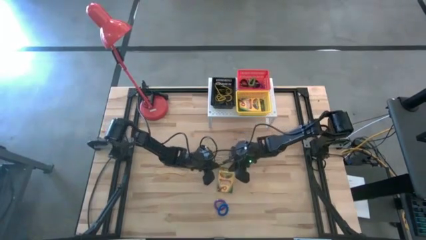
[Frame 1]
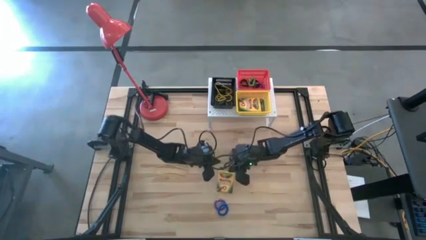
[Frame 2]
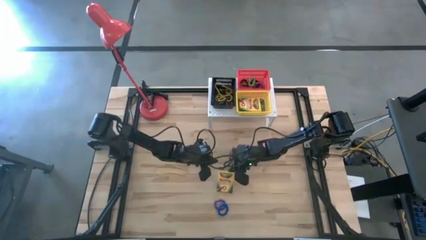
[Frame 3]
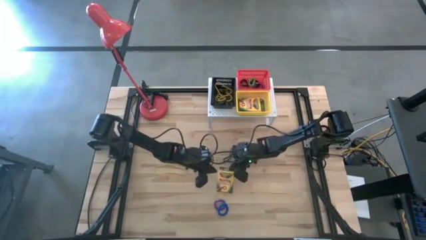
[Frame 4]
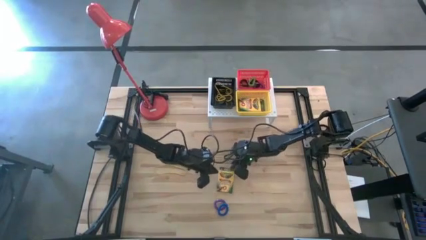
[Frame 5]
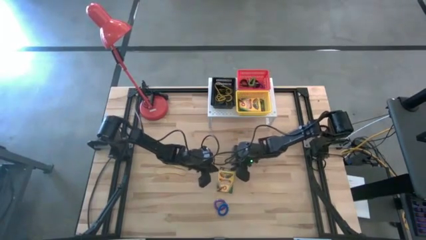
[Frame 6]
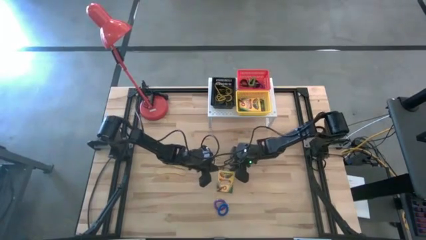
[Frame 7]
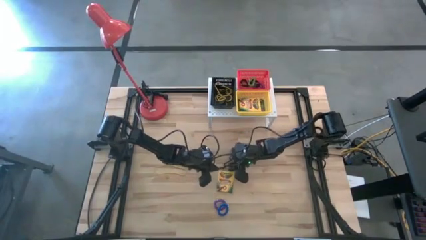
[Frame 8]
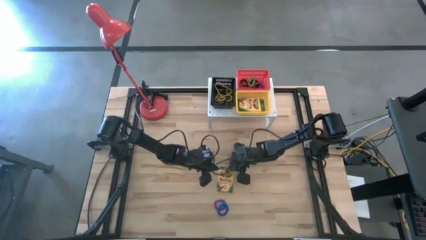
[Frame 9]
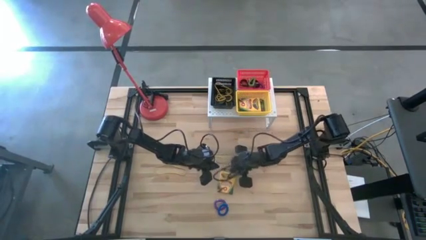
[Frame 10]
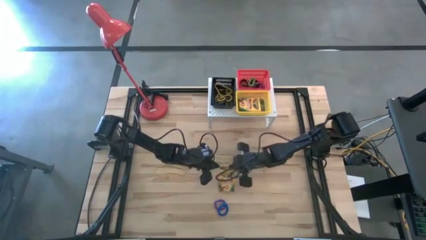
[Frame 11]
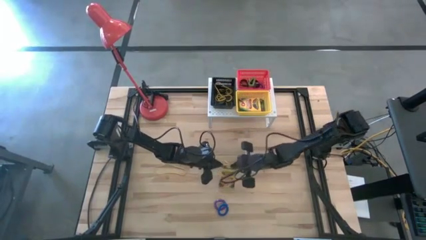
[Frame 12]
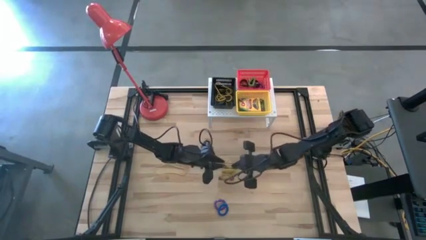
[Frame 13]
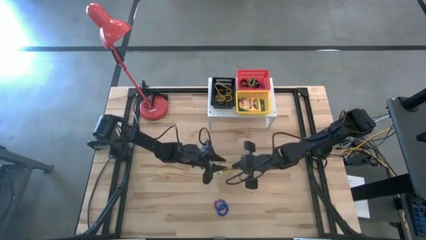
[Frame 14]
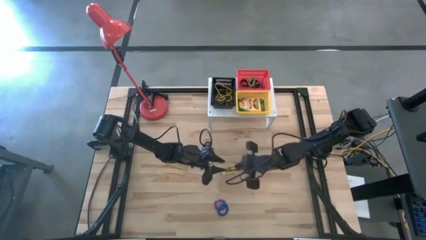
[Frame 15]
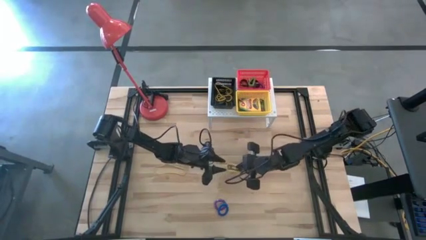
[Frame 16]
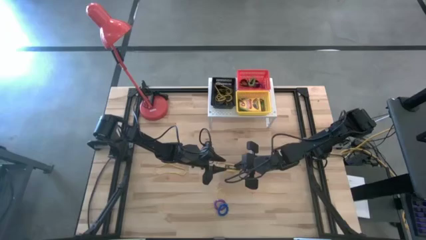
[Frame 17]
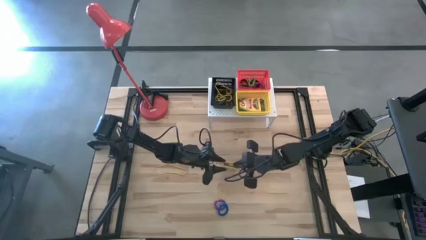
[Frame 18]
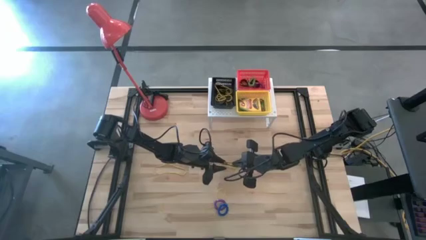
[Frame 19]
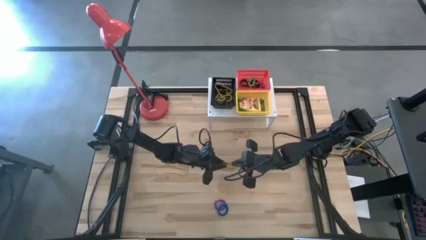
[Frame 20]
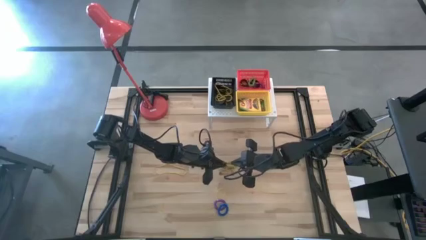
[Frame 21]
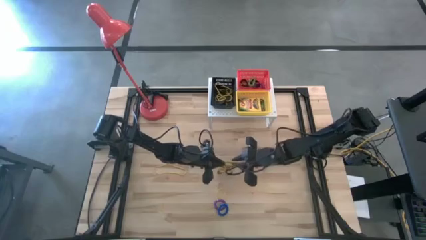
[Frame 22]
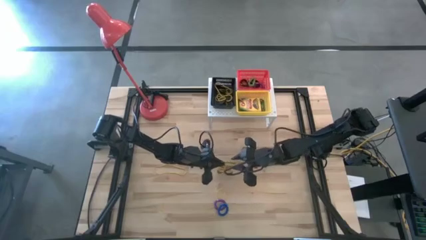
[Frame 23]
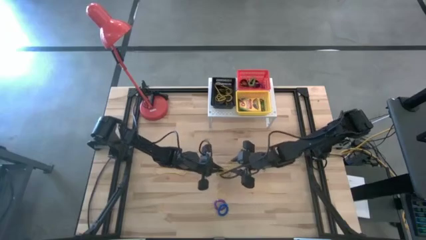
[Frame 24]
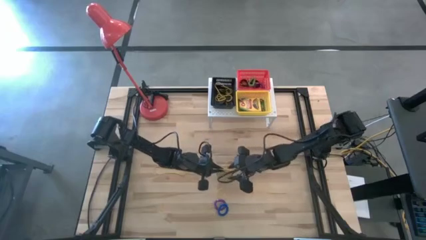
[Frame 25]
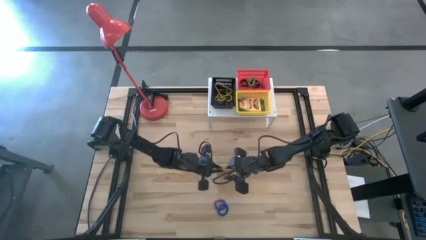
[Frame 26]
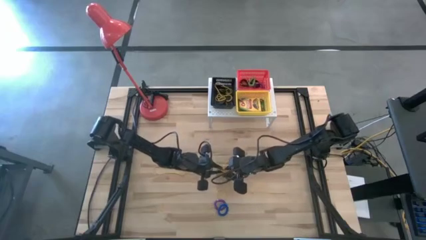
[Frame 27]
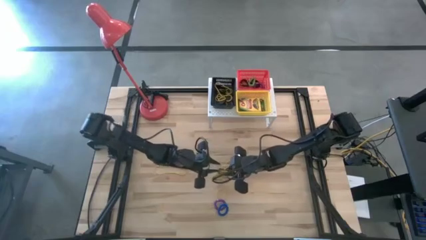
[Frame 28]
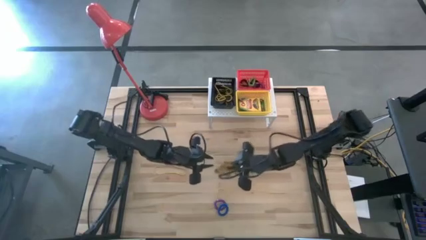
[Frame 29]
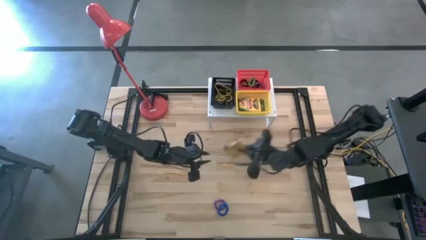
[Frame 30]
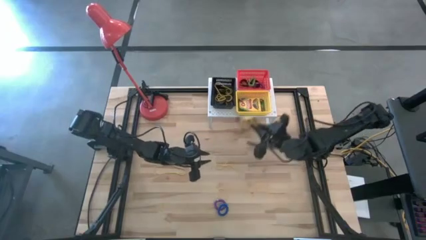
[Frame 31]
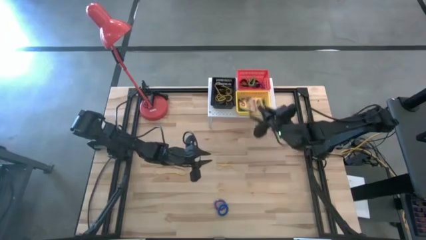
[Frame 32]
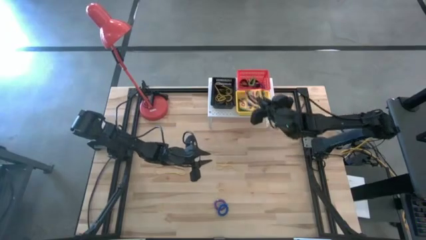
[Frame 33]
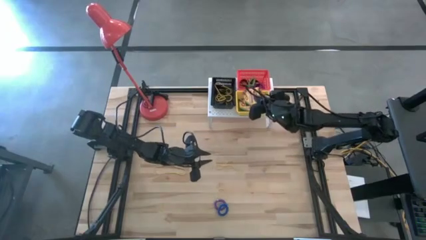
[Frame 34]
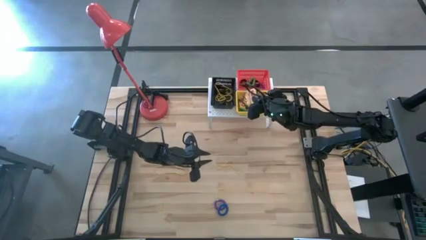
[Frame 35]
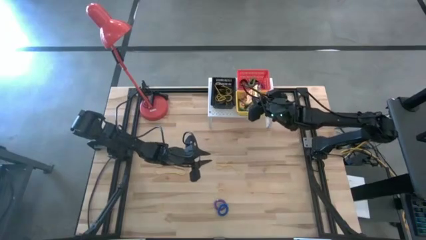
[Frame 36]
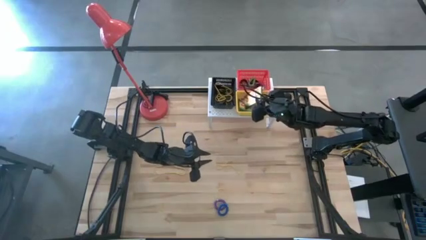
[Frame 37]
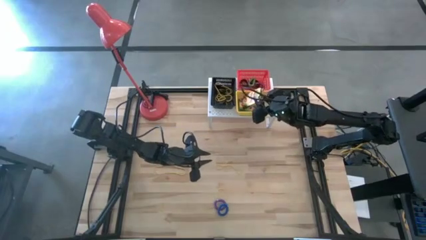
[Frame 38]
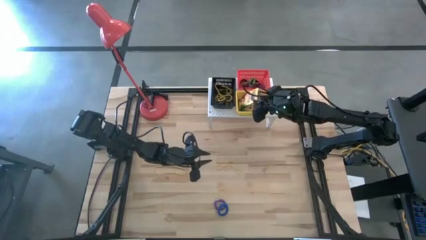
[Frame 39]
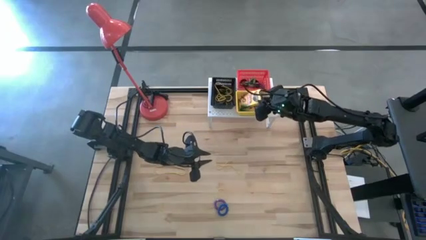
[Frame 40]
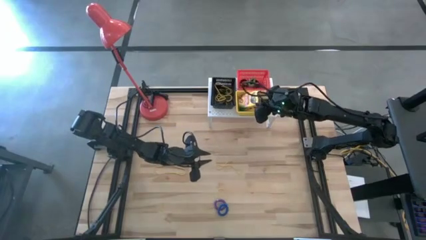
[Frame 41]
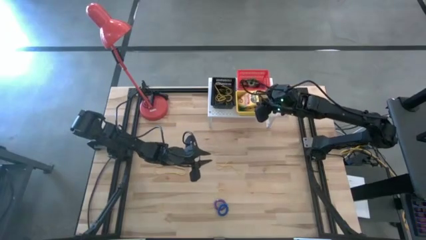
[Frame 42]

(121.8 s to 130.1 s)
Task: Pick & Place Office Desk Supplies
Put the yellow crayon box into the yellow bin on the shelf

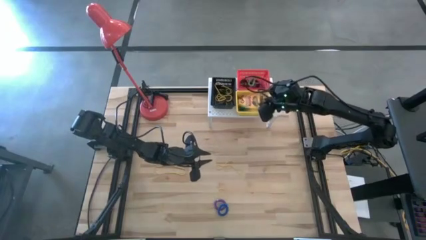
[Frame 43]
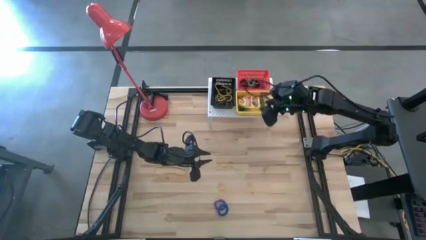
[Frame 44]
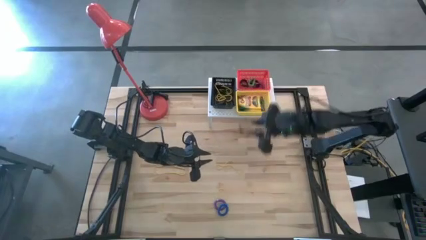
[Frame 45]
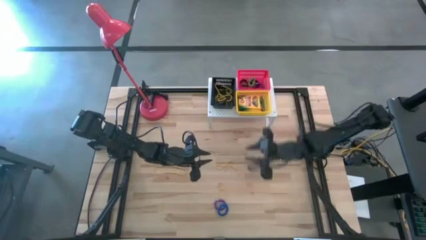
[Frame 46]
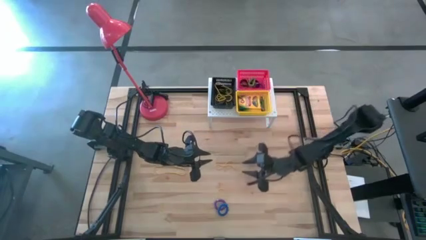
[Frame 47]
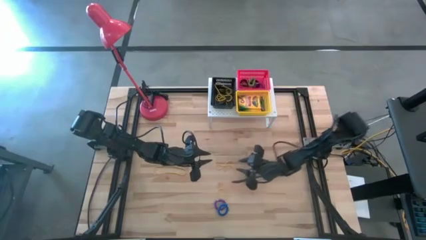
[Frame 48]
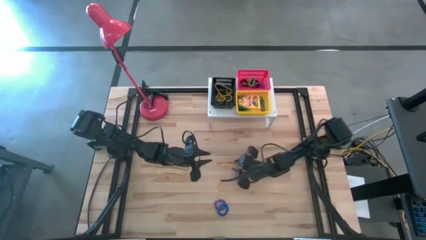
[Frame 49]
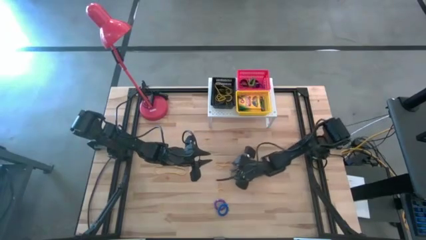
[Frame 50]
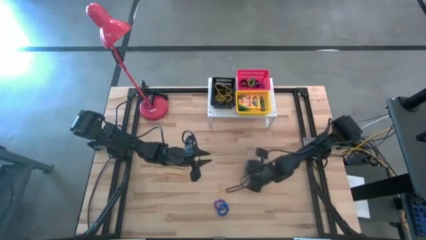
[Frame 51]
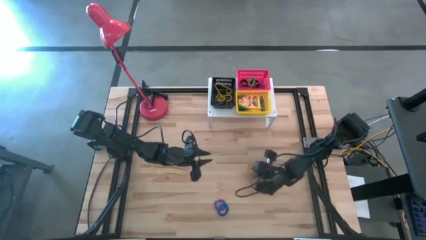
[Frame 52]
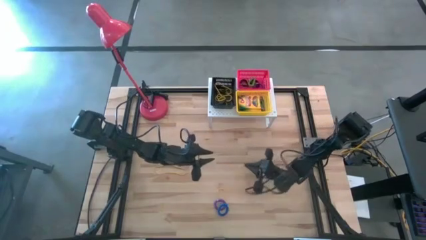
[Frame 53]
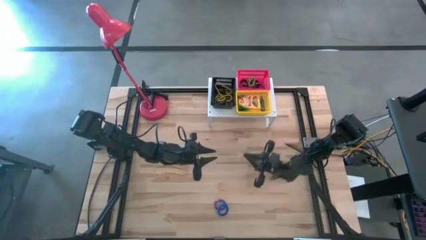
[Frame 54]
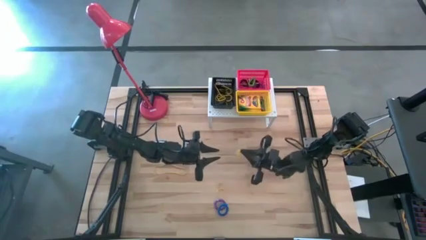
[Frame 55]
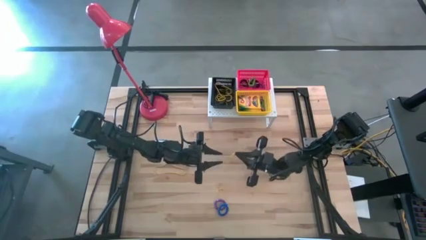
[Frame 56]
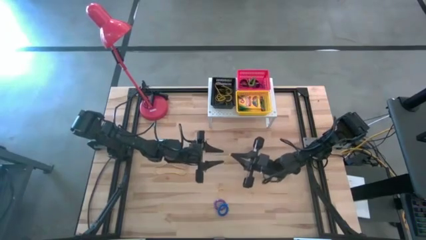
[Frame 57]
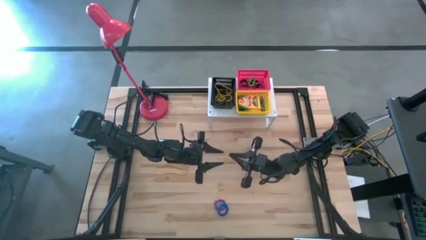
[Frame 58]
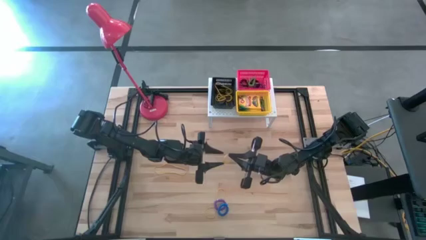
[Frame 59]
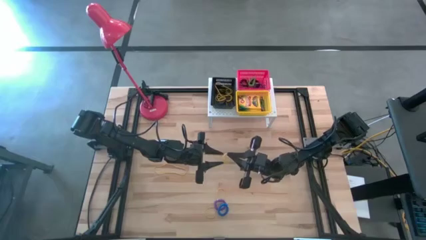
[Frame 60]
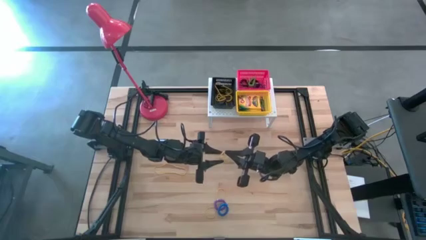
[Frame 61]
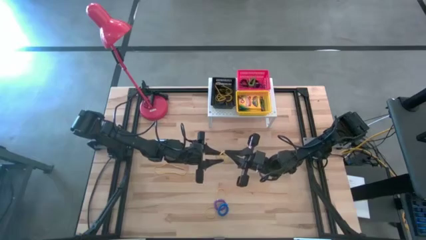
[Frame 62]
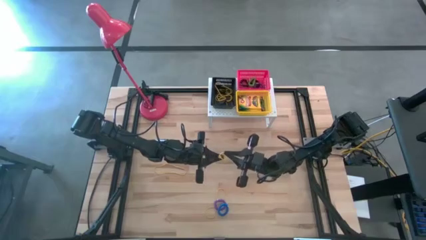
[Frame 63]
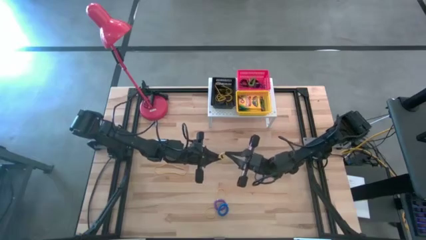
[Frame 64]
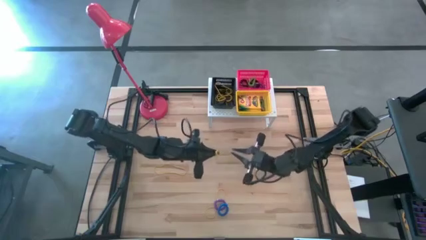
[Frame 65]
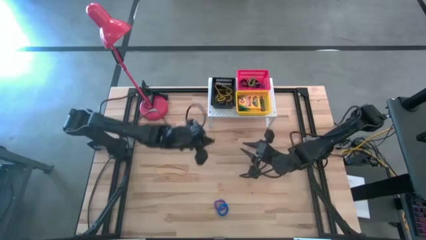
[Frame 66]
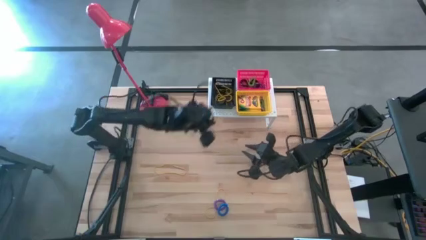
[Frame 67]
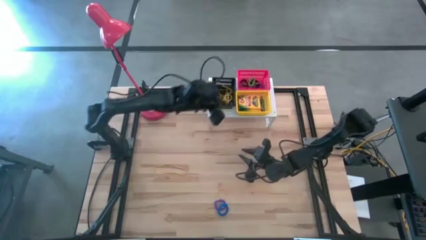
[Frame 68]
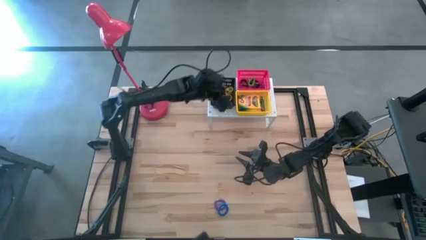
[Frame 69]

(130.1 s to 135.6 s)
Put the yellow rubber band into the black bin on the shelf

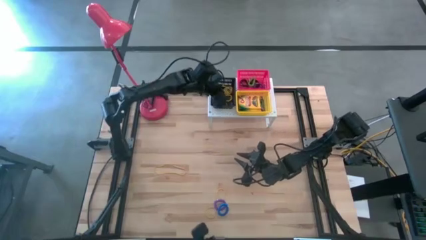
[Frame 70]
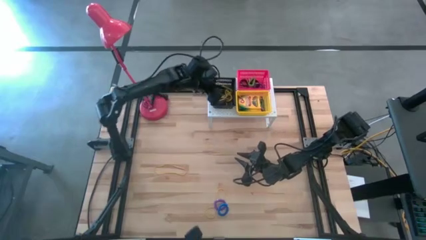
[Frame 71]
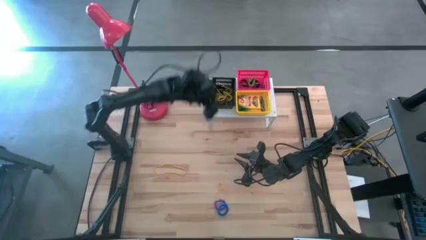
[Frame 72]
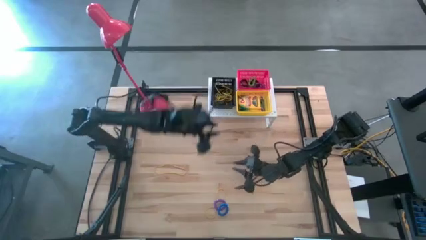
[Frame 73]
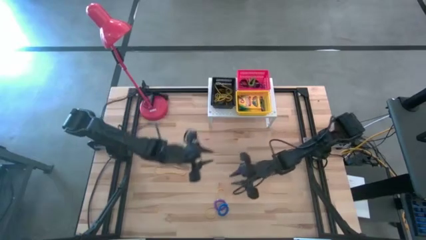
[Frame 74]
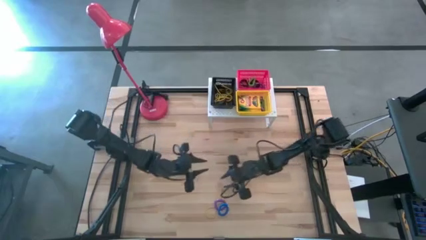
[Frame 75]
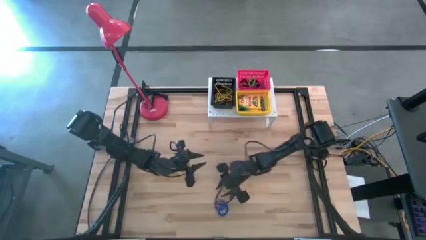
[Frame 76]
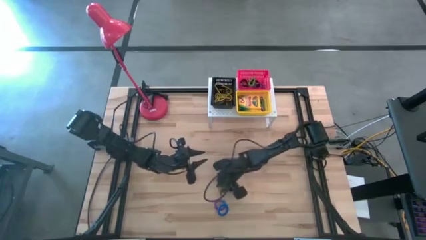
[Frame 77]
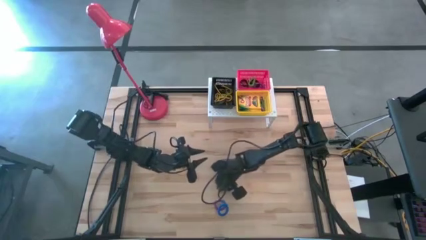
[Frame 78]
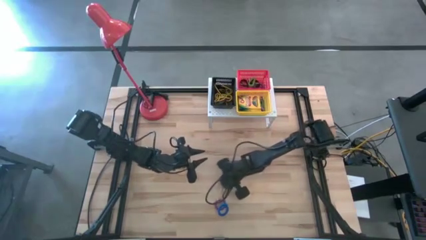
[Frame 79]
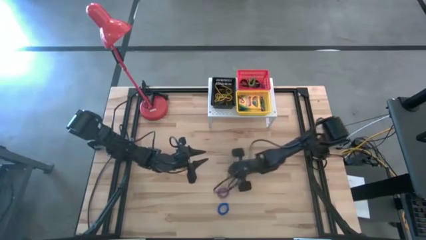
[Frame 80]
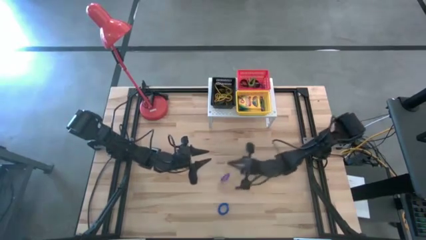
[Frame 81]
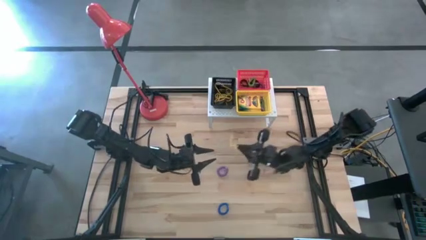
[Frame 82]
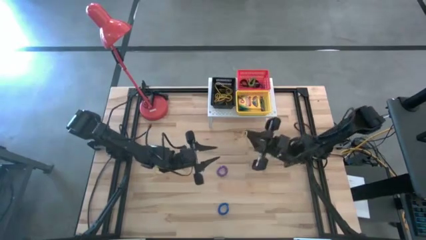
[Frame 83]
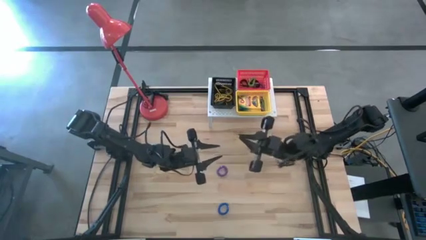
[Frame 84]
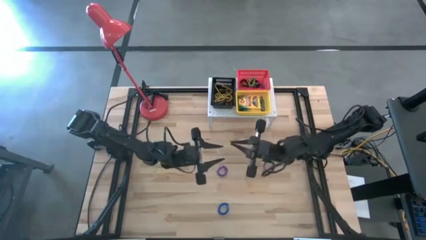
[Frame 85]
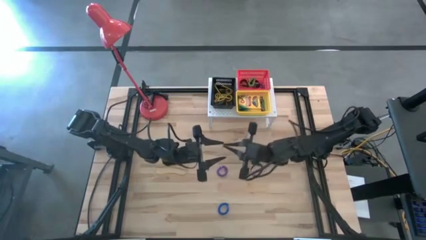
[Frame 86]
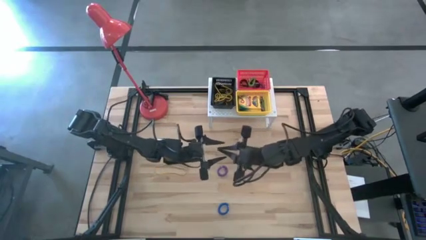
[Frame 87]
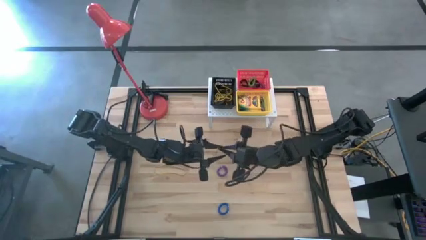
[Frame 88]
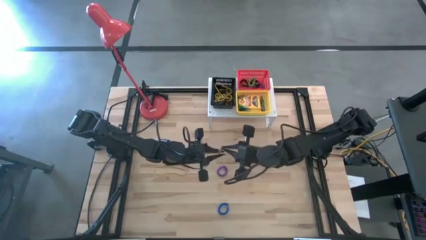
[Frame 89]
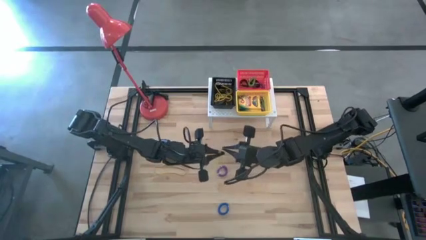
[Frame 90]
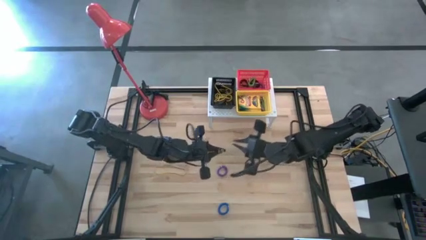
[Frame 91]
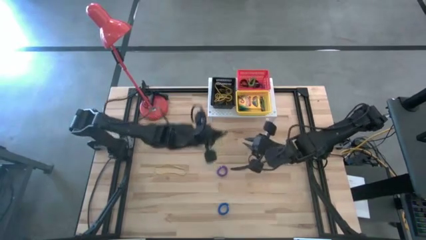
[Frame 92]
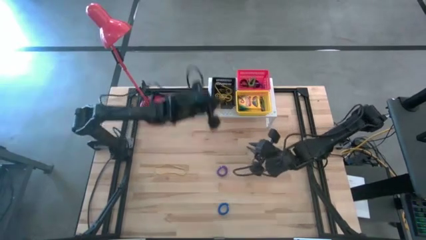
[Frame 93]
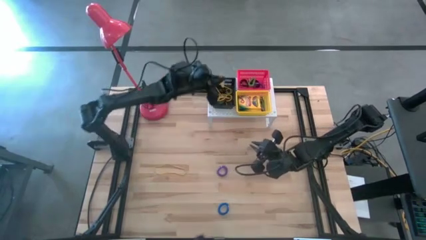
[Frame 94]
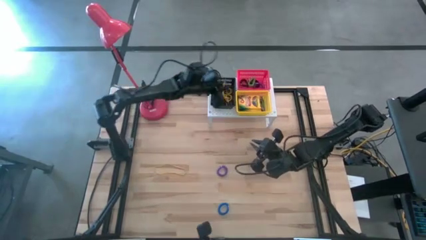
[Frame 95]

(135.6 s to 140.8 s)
Put the yellow rubber band into the black bin on the shelf
